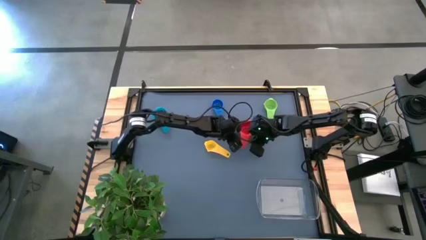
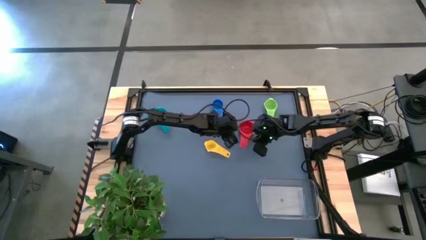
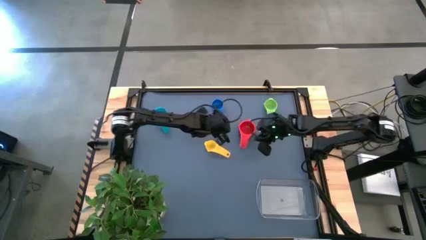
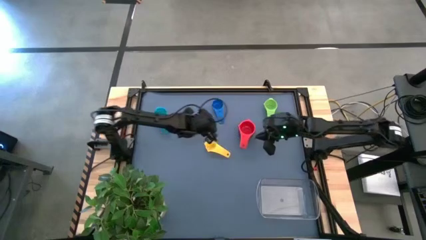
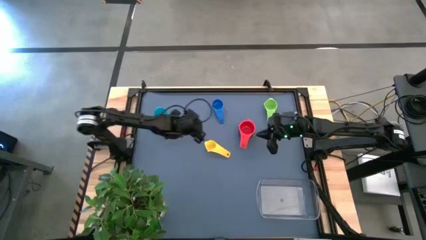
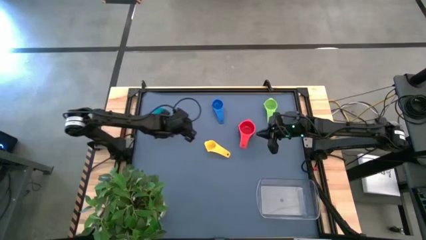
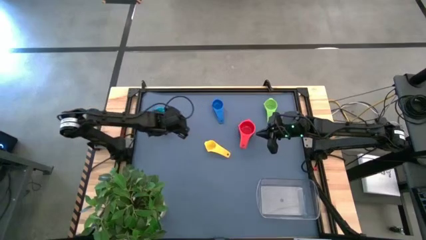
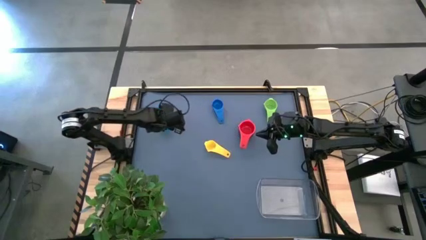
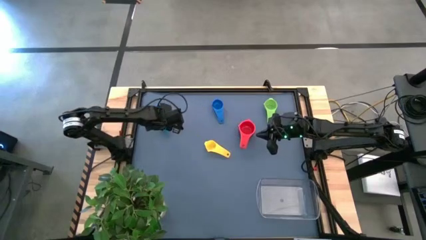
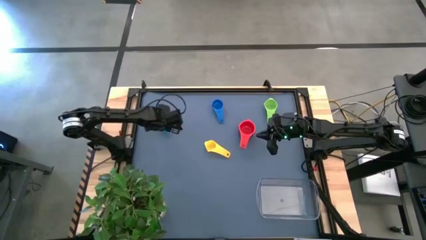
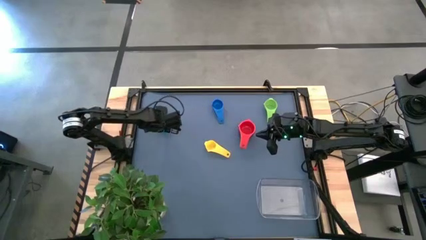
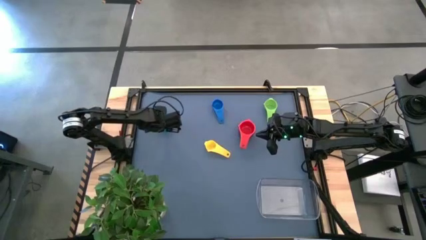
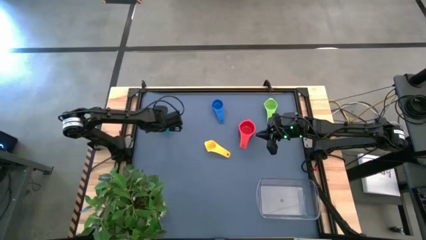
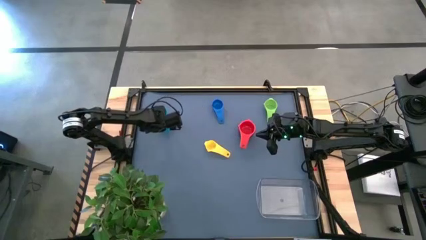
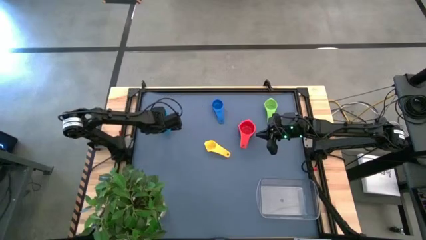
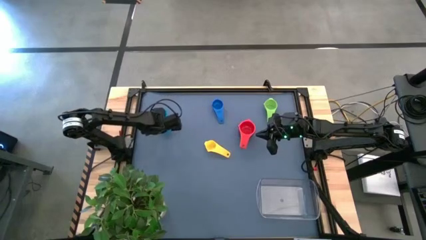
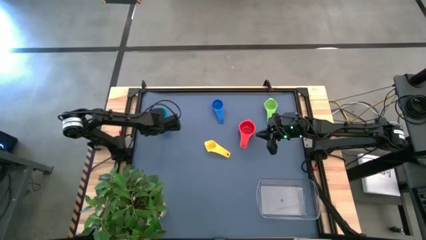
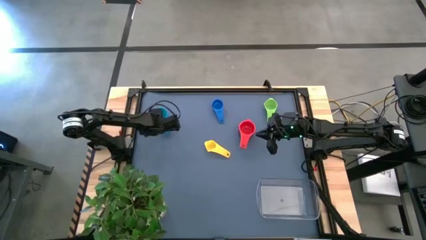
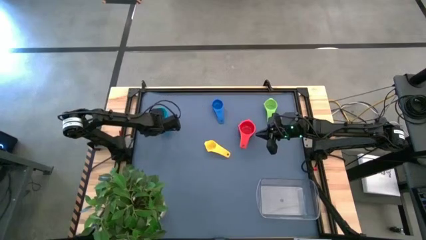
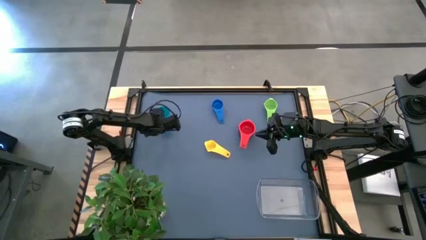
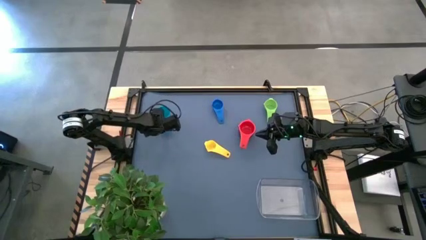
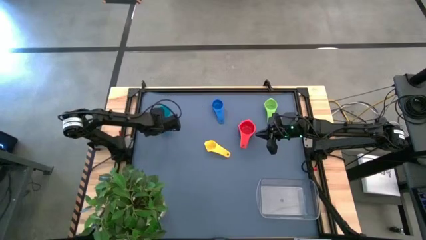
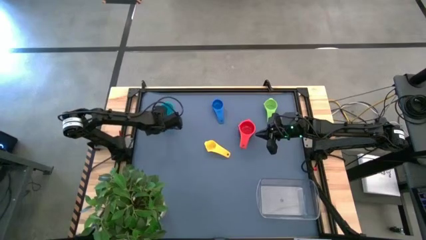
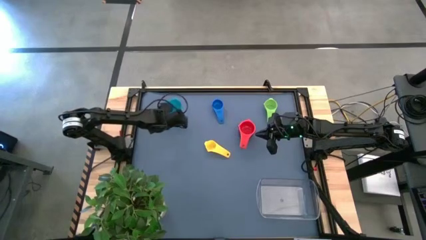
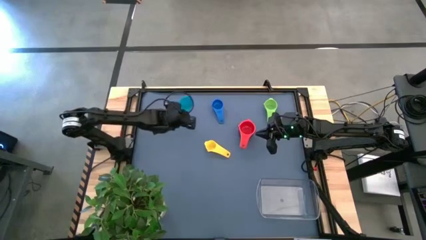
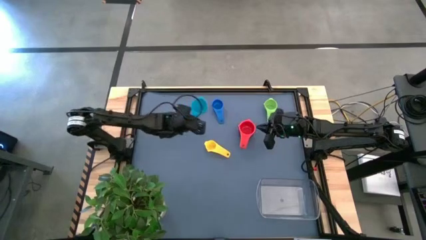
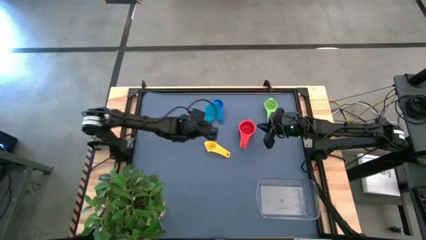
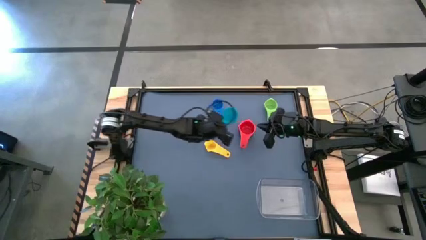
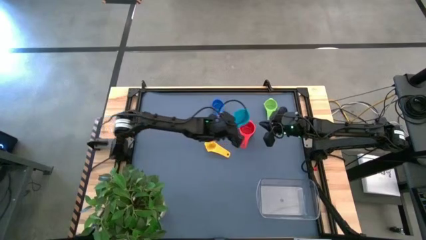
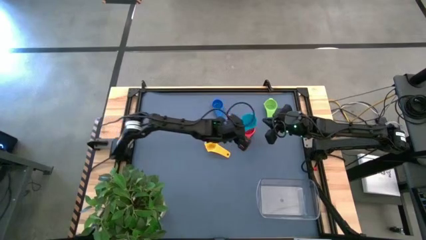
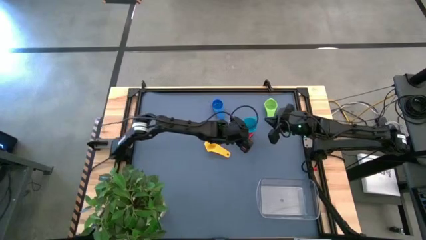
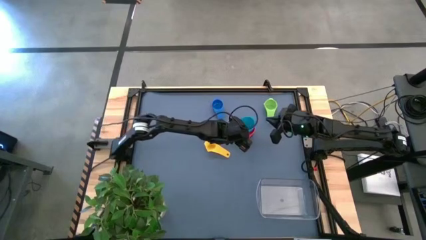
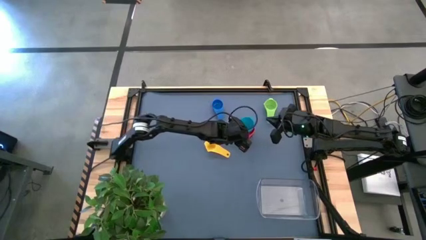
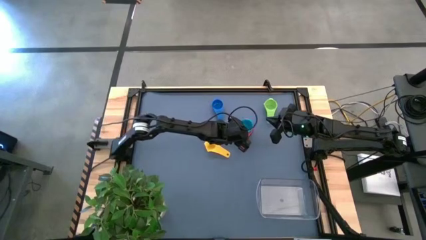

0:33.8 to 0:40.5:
Task: Nest measuring cups in basket
Stack the light blue measuring cup on top of the red measuring cup

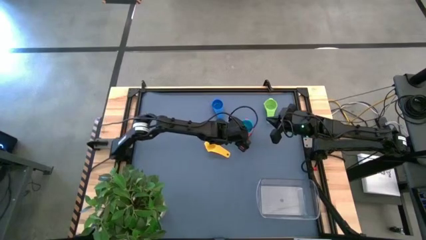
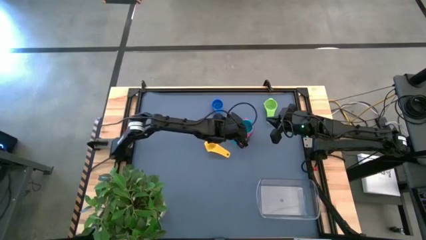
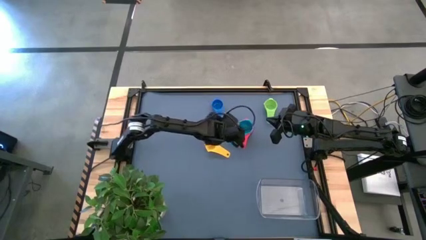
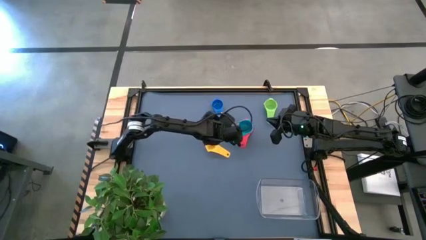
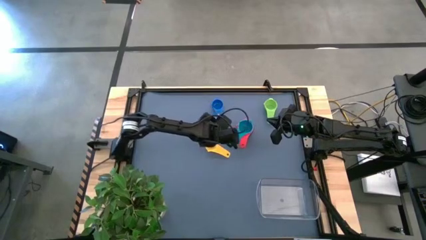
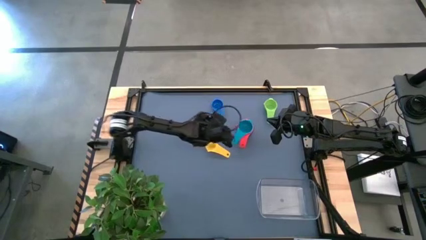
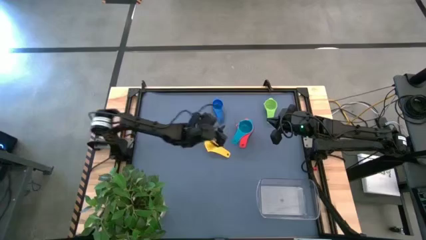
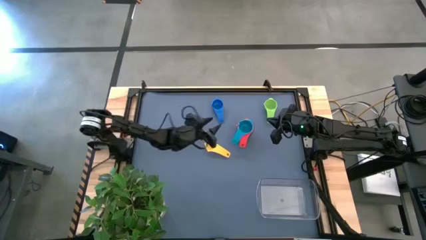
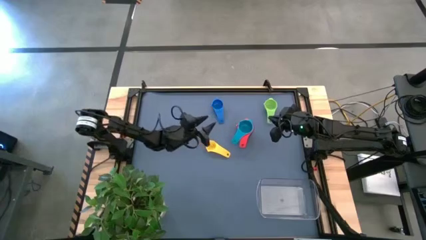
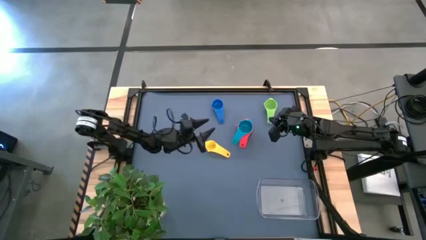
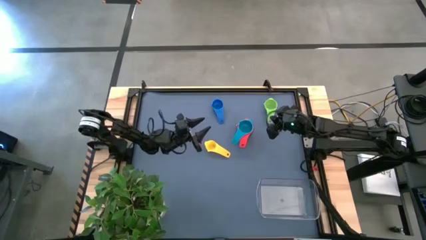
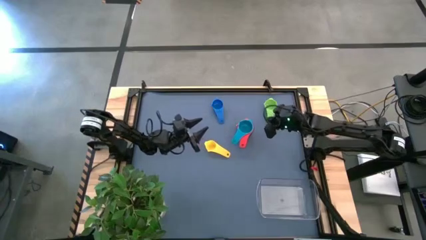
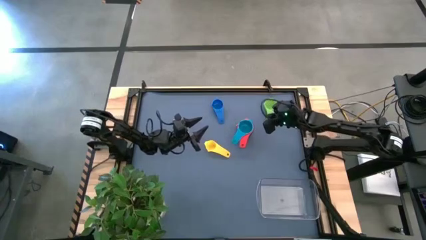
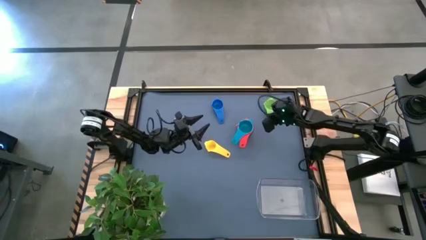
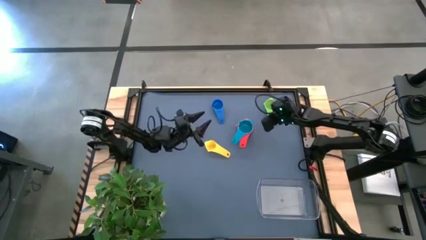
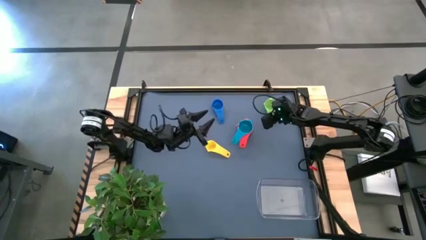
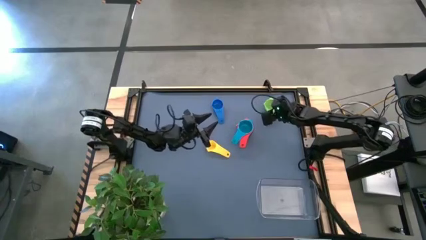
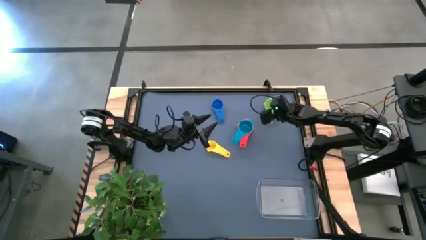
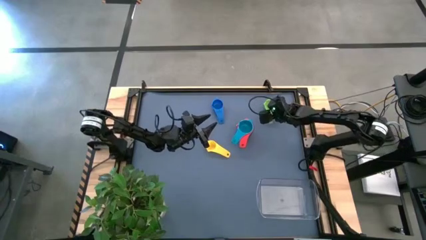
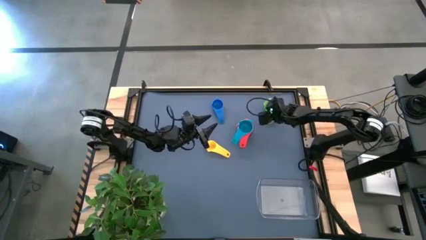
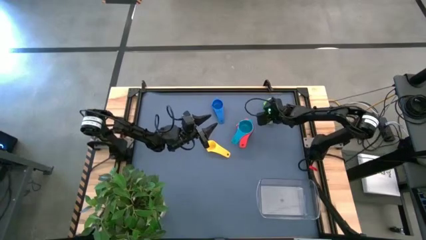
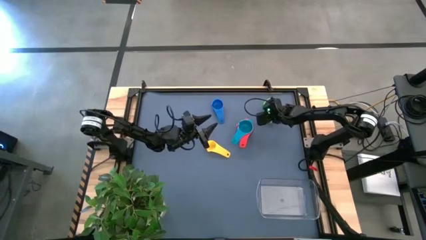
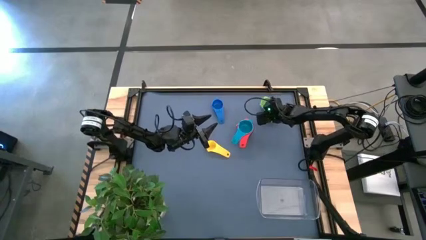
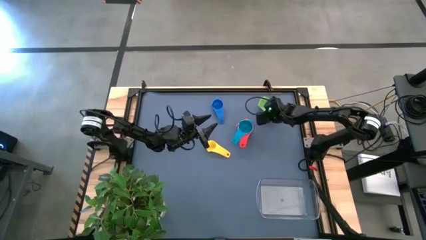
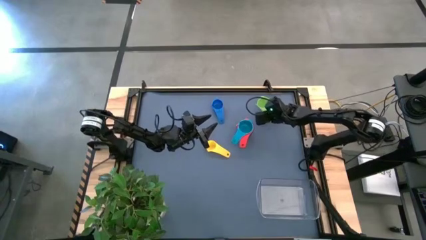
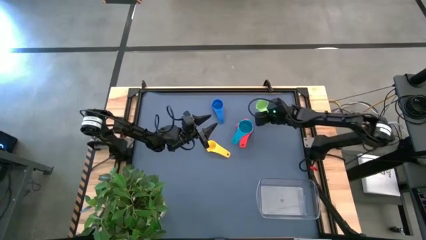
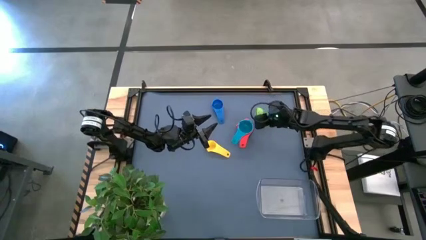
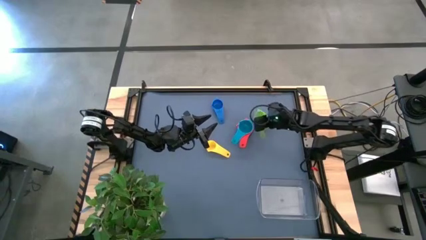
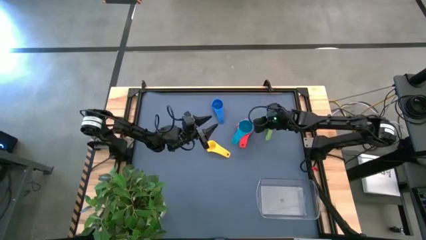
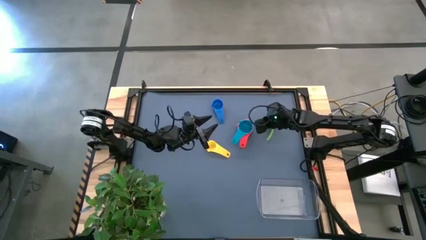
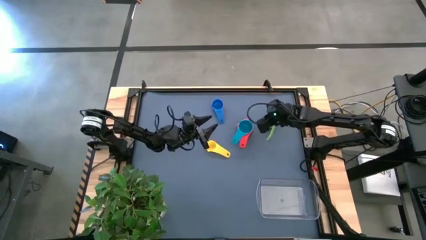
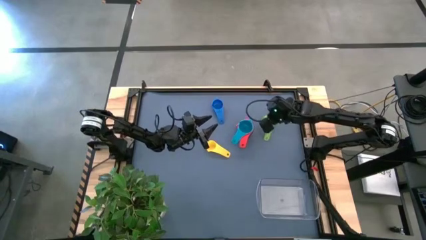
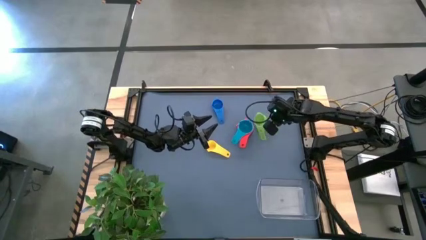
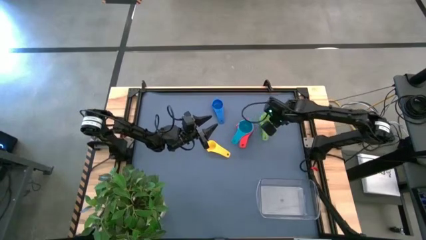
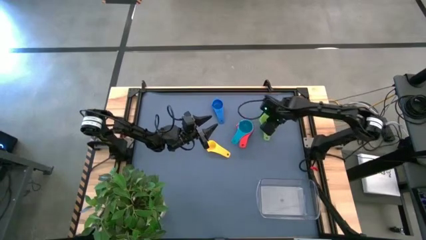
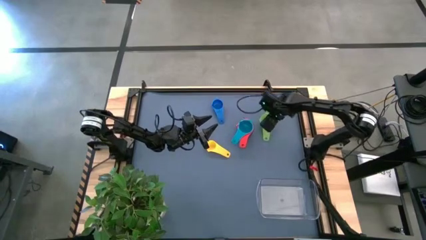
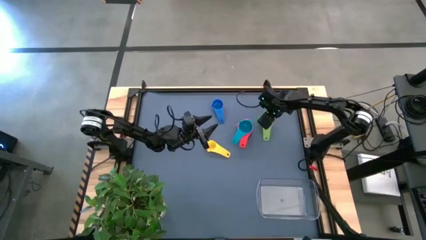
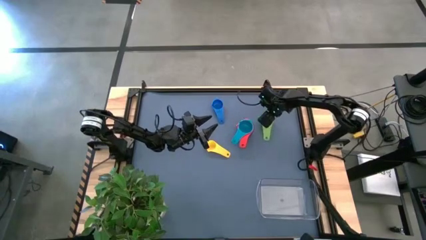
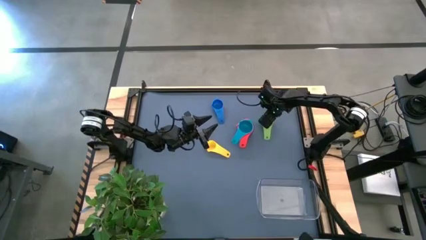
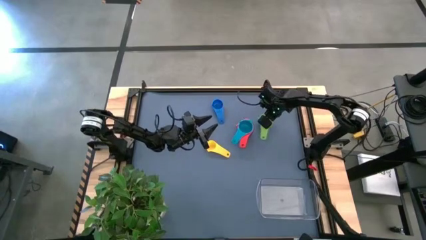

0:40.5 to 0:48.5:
Stack the green measuring cup on top of the light blue measuring cup

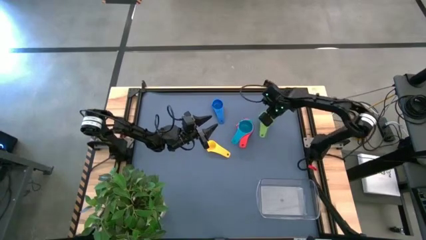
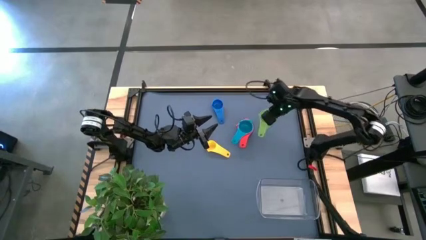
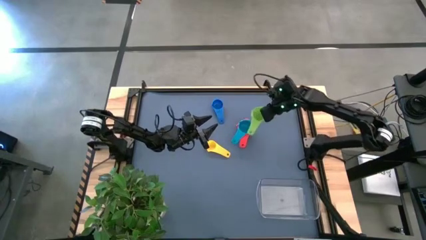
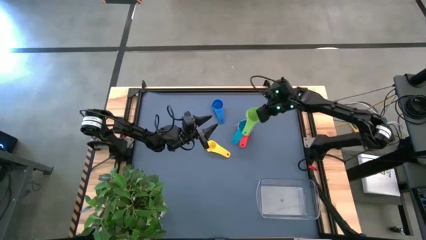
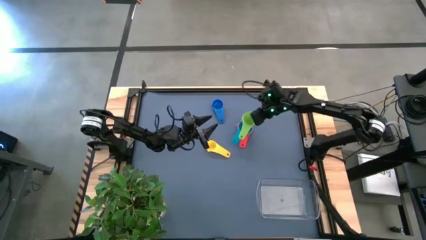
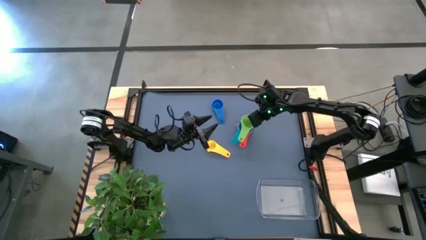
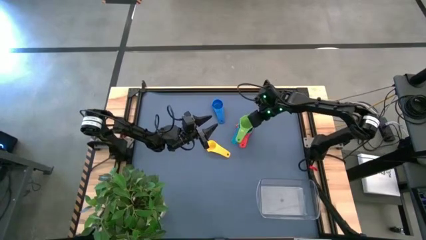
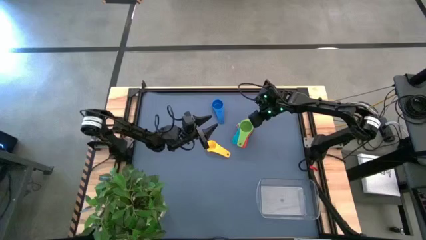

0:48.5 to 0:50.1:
Stack the green measuring cup on top of the light blue measuring cup
